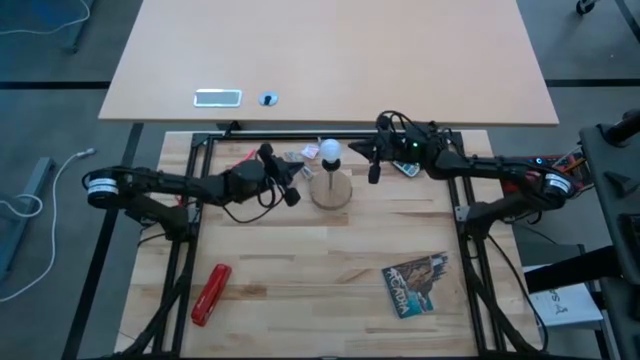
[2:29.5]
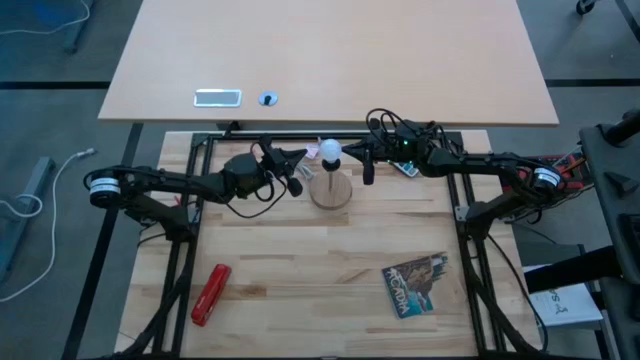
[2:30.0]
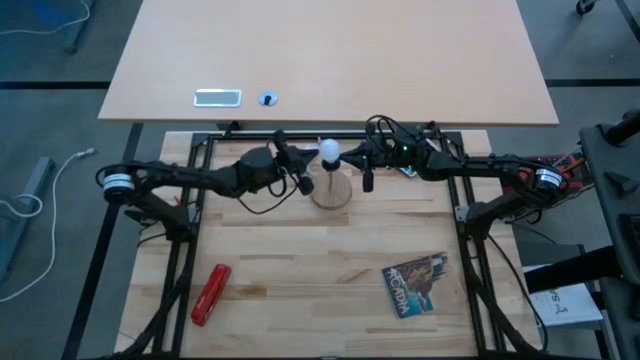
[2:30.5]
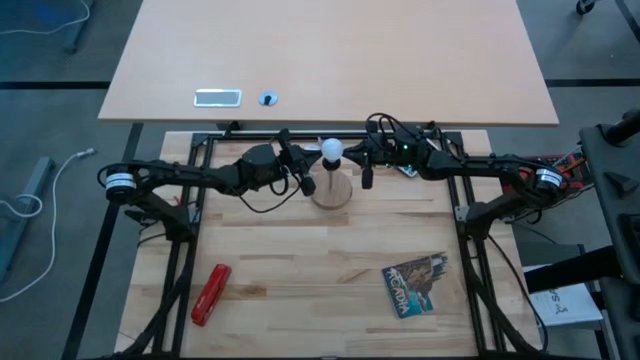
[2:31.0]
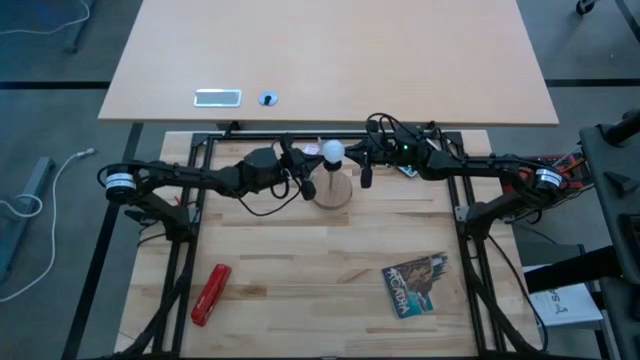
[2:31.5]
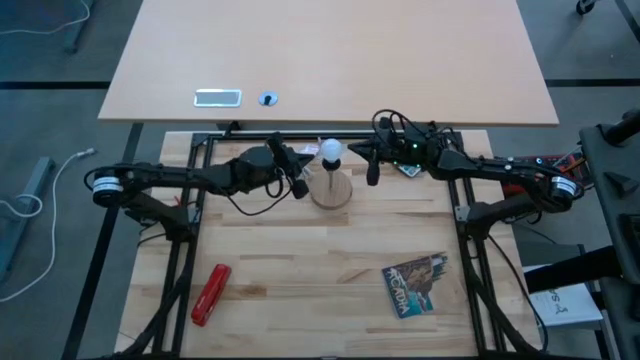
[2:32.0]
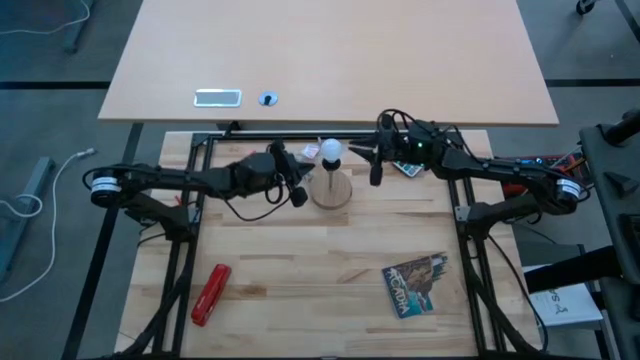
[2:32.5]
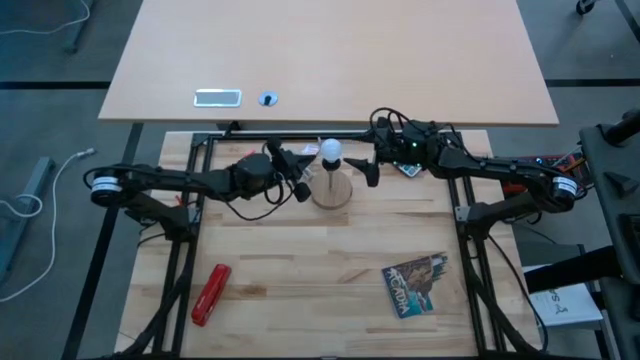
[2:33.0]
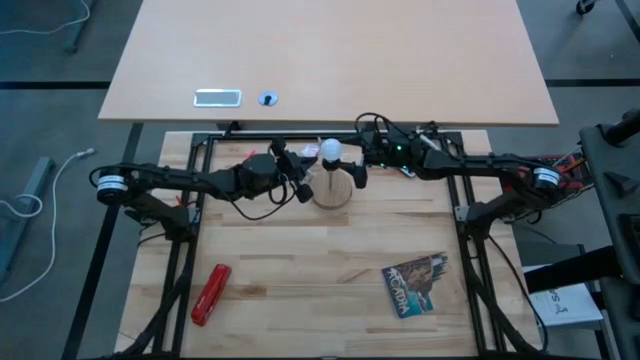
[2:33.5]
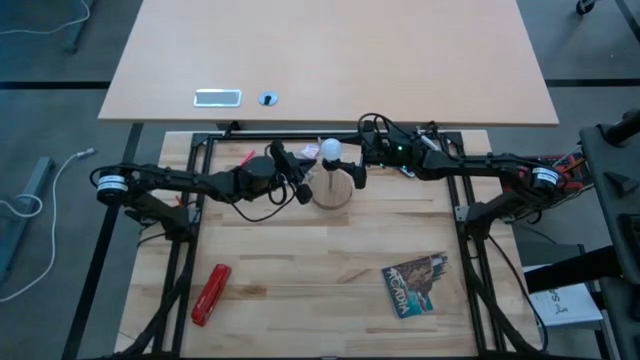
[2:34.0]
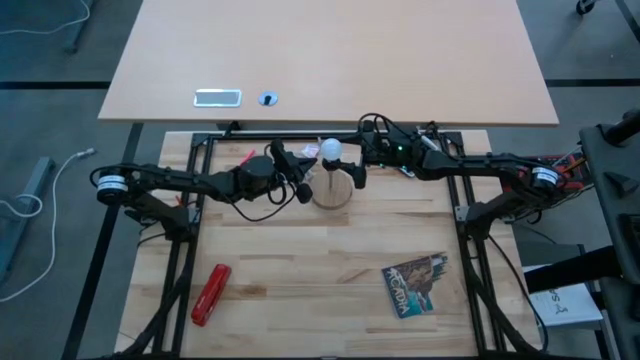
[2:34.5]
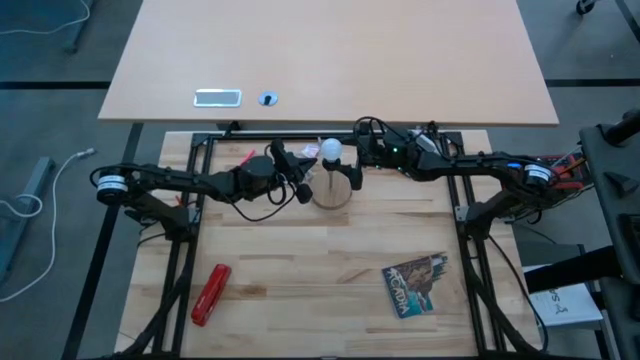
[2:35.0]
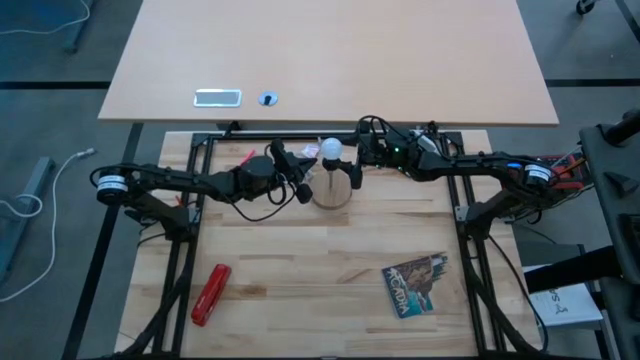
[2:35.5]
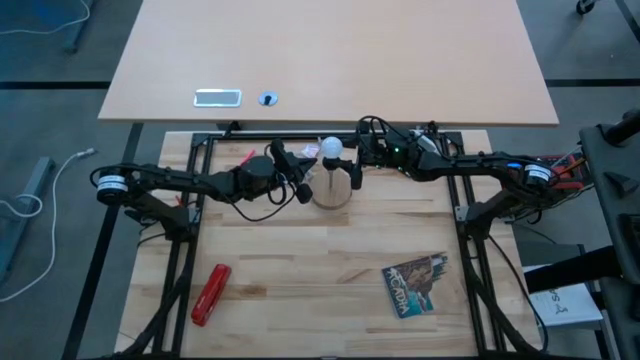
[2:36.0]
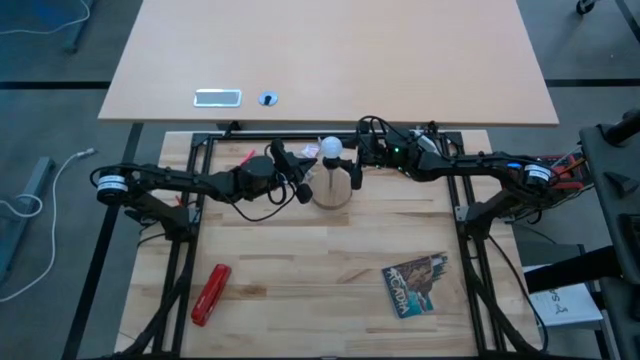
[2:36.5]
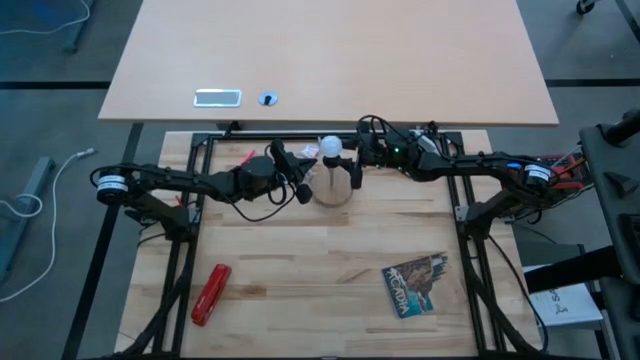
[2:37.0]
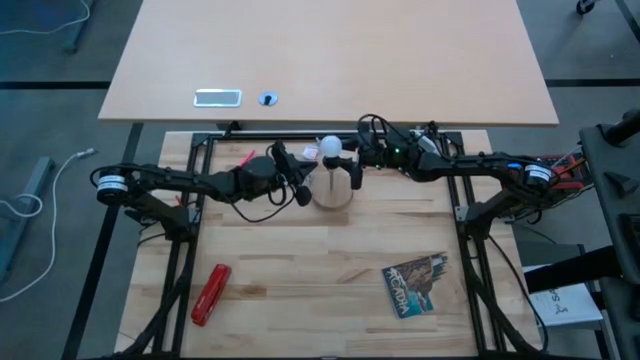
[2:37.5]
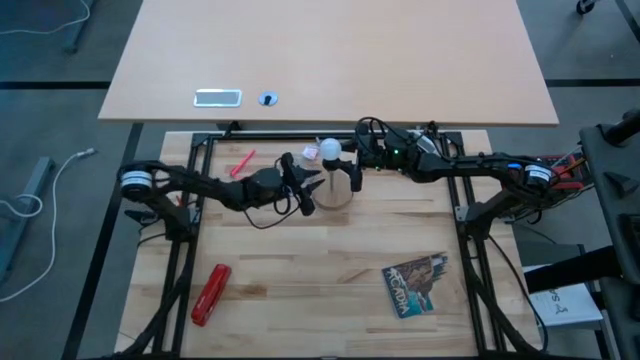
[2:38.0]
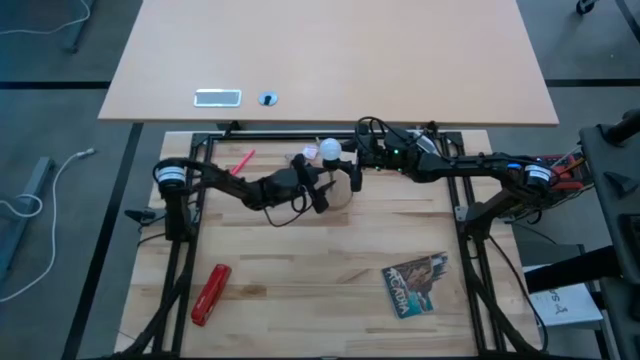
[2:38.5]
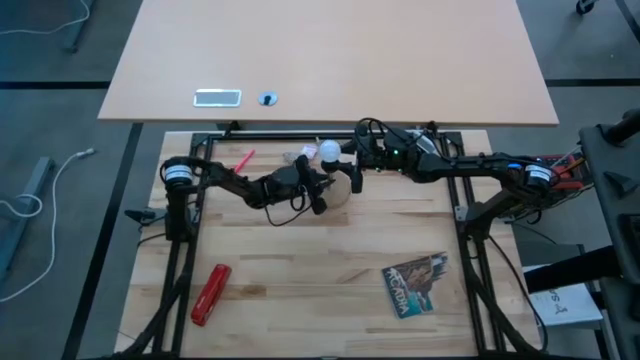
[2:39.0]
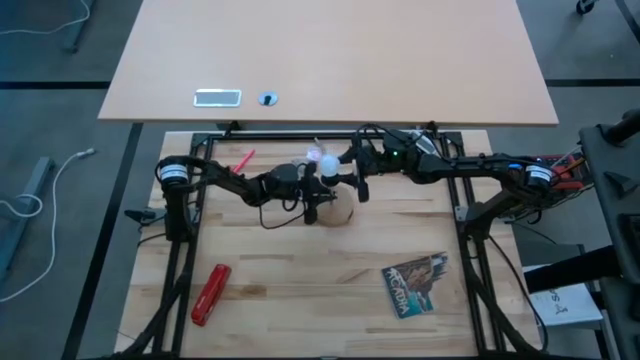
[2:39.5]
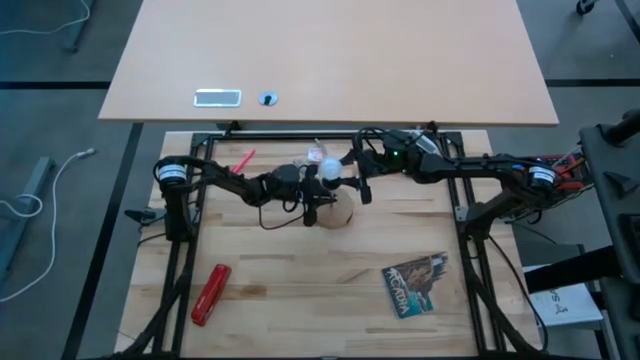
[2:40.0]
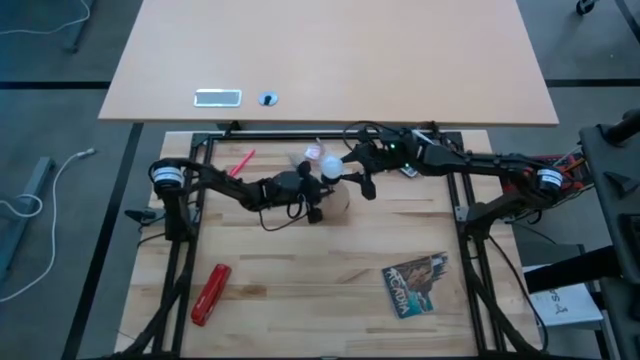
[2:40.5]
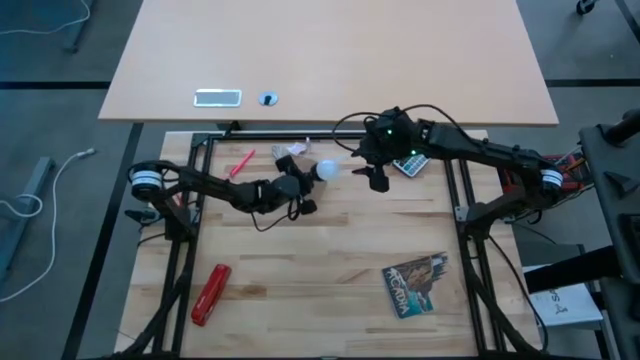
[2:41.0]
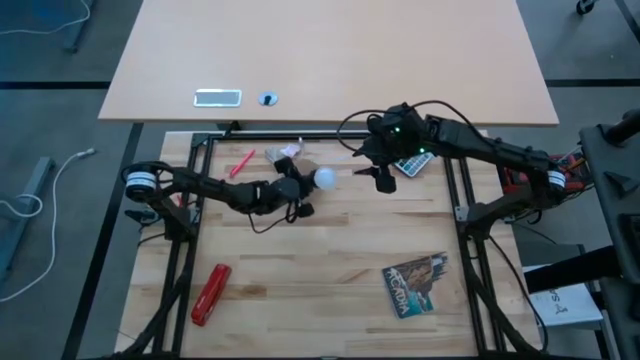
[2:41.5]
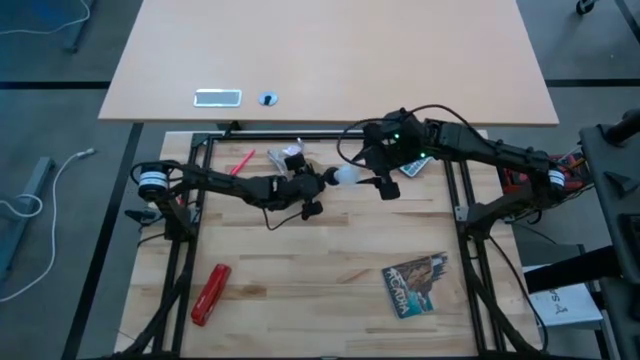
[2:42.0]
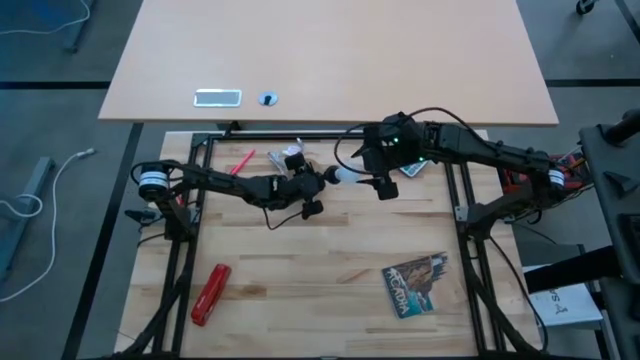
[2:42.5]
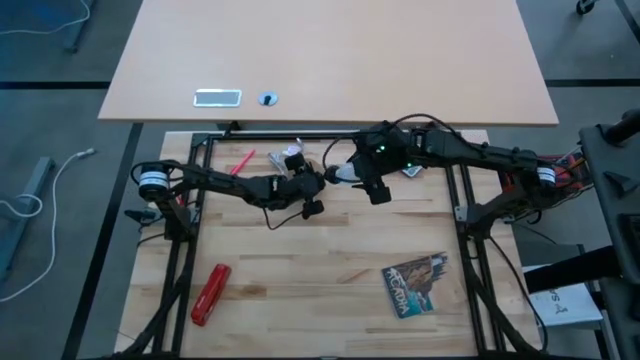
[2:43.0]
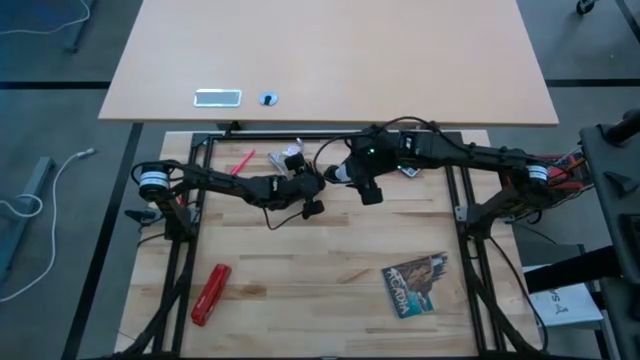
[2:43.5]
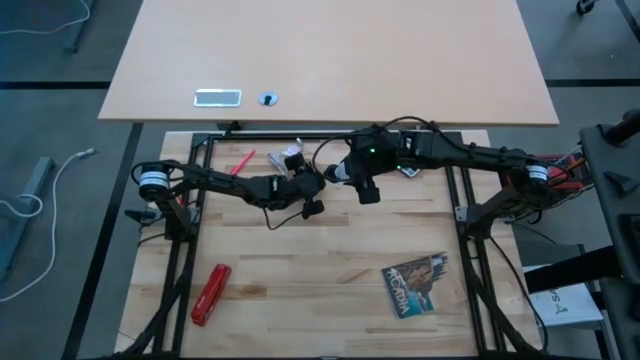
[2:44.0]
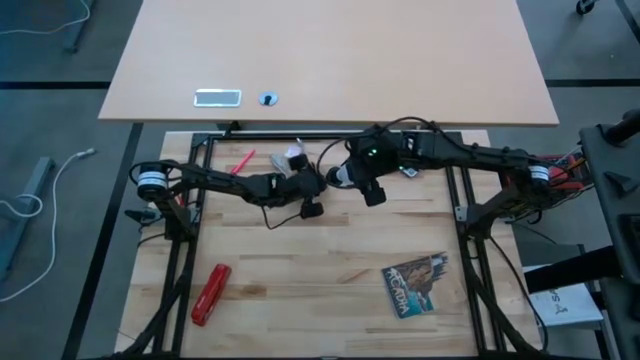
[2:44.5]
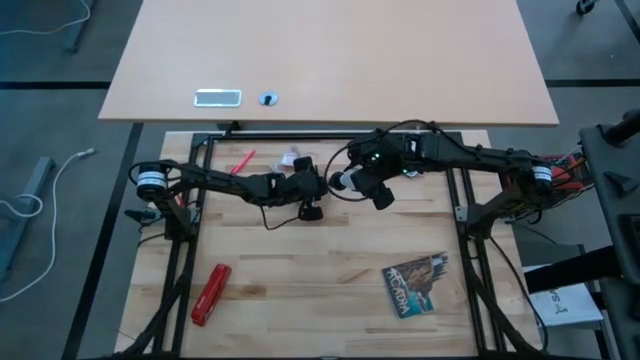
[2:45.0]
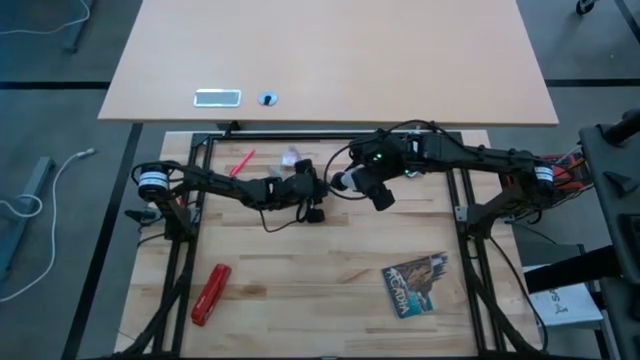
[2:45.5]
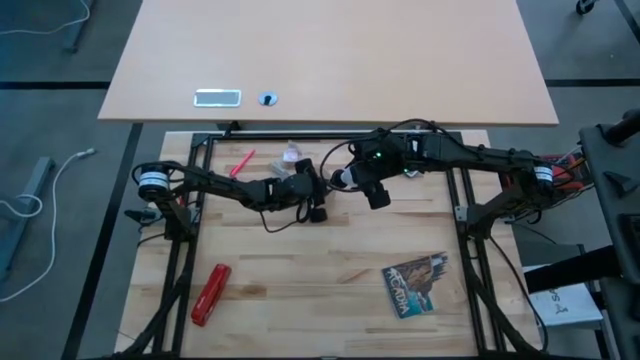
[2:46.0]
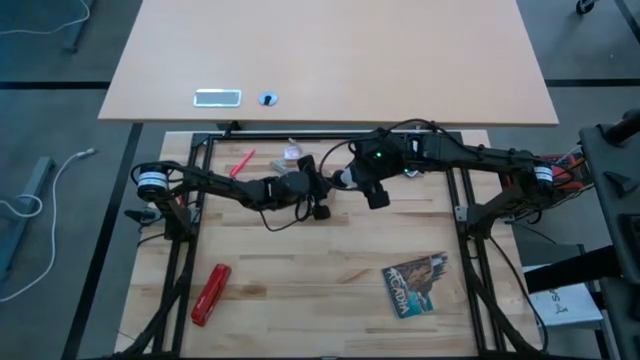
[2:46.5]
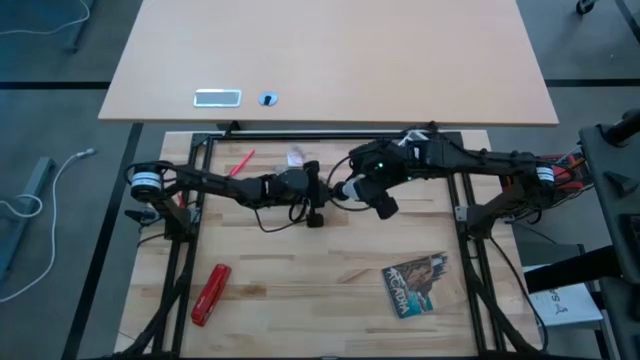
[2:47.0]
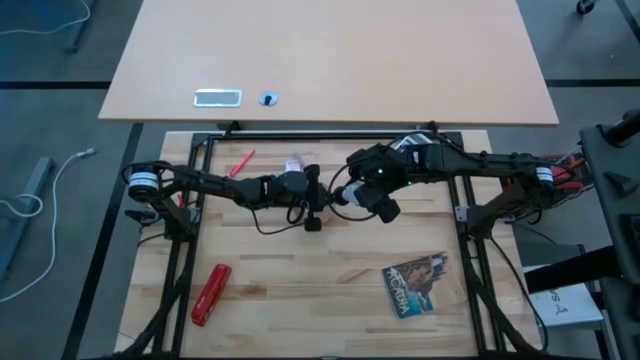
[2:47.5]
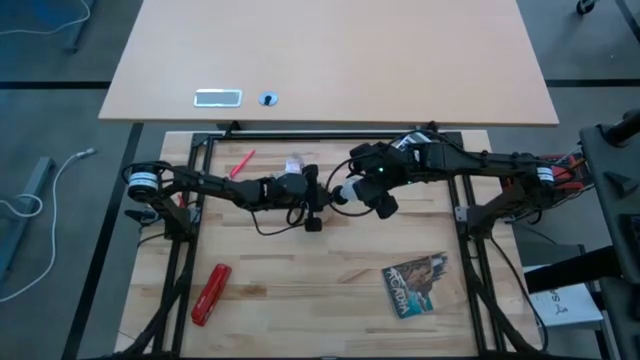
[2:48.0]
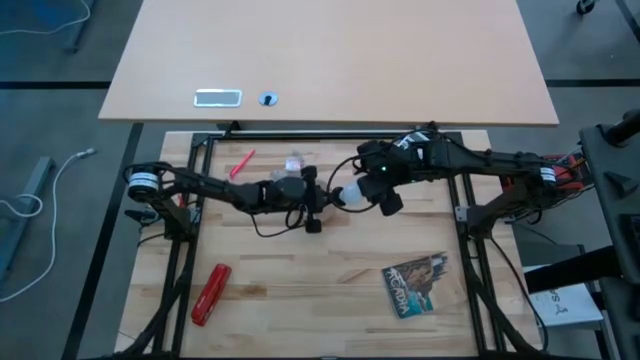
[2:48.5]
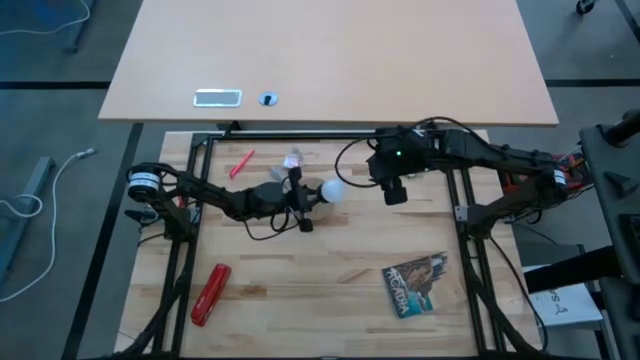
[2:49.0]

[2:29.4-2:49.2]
Task: Screw lightbulb
Remove the lightbulb from the lamp
